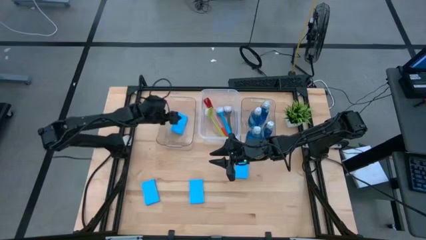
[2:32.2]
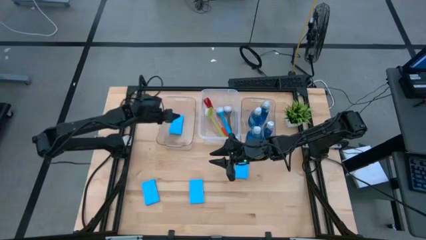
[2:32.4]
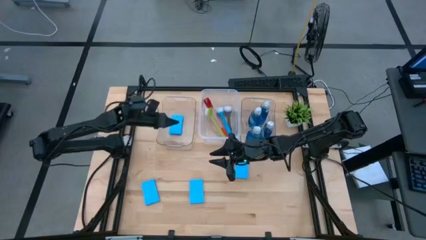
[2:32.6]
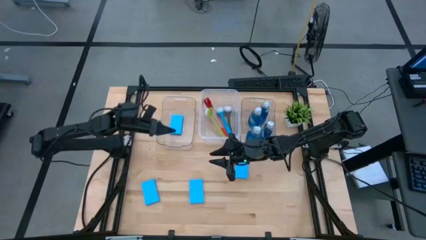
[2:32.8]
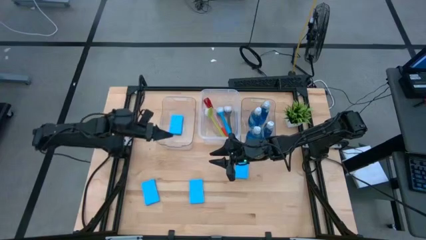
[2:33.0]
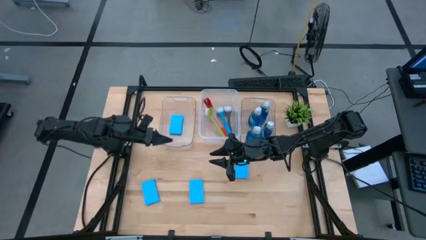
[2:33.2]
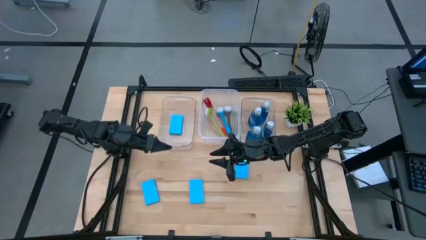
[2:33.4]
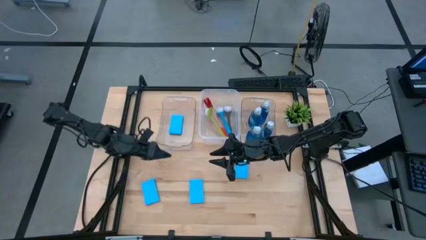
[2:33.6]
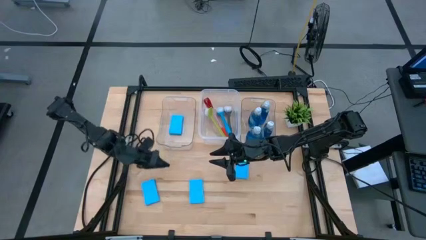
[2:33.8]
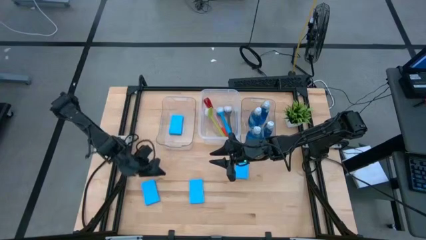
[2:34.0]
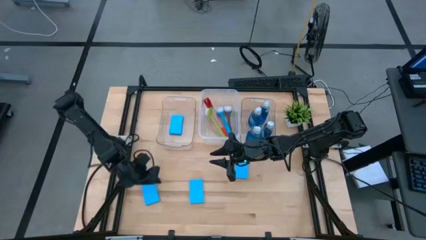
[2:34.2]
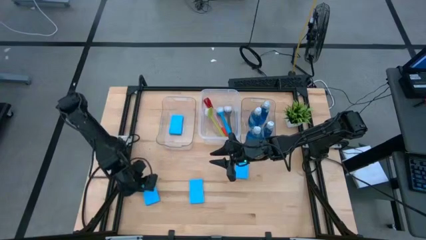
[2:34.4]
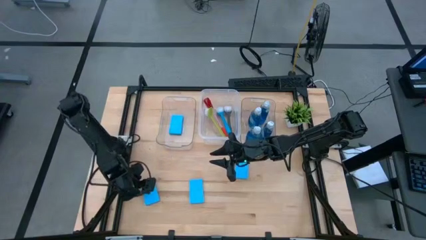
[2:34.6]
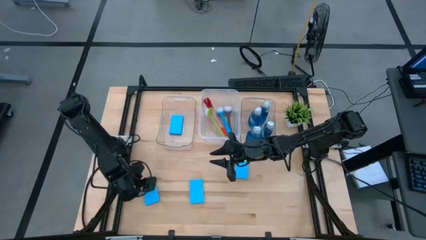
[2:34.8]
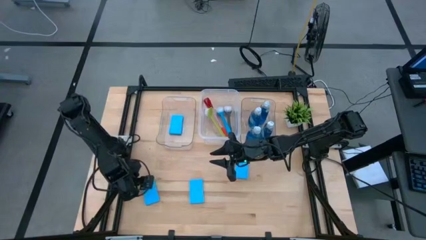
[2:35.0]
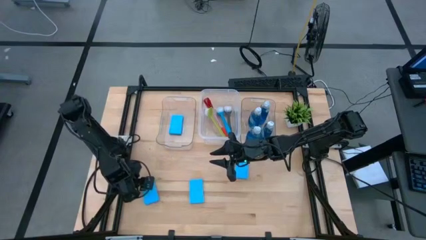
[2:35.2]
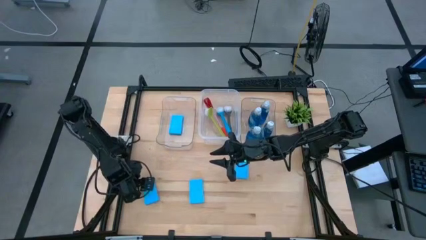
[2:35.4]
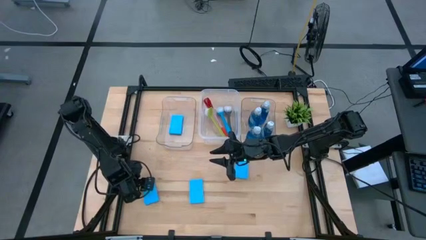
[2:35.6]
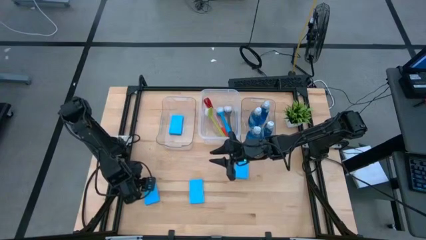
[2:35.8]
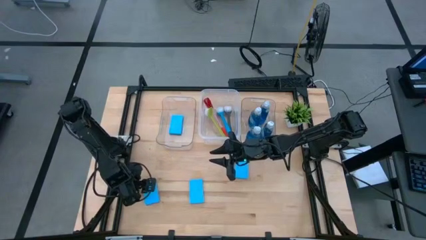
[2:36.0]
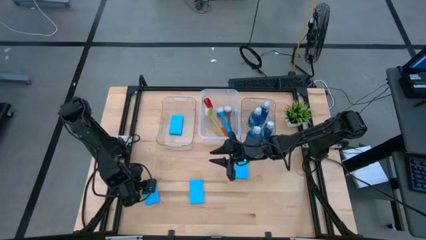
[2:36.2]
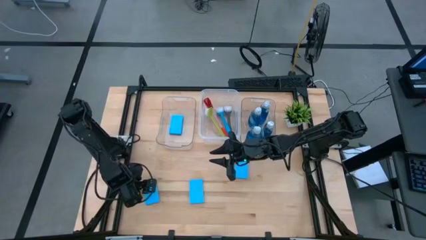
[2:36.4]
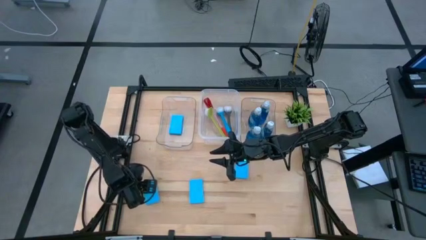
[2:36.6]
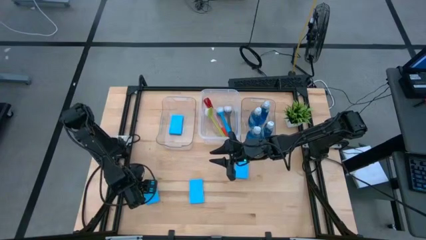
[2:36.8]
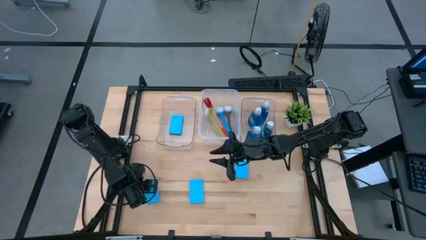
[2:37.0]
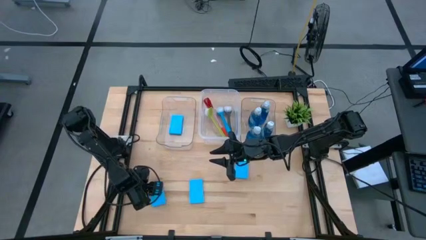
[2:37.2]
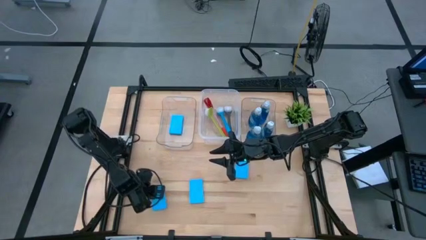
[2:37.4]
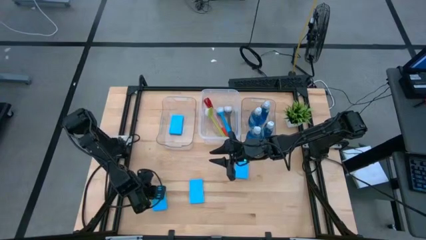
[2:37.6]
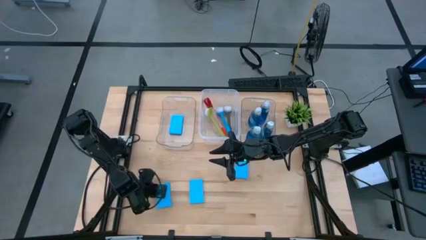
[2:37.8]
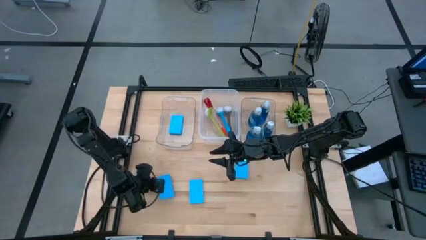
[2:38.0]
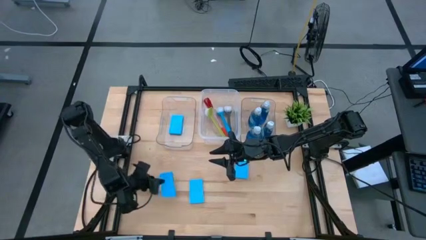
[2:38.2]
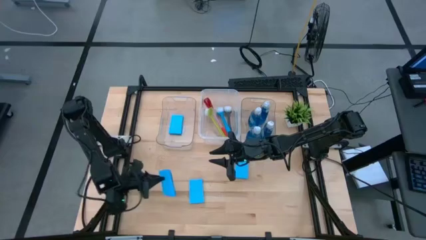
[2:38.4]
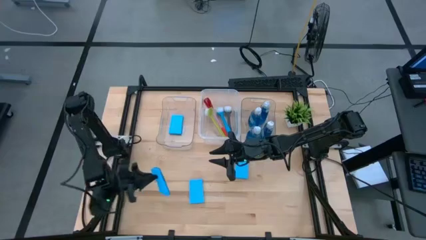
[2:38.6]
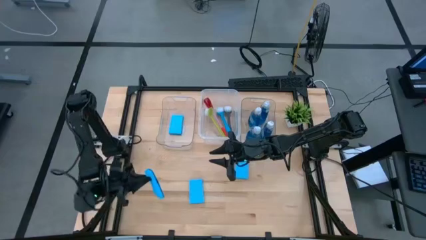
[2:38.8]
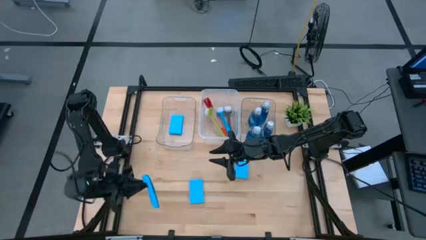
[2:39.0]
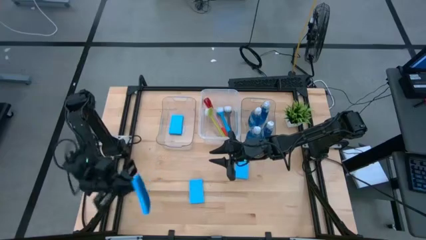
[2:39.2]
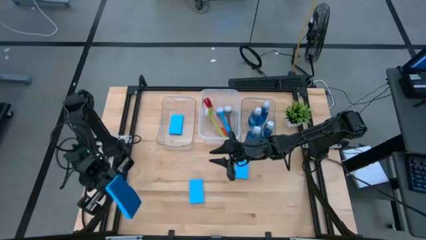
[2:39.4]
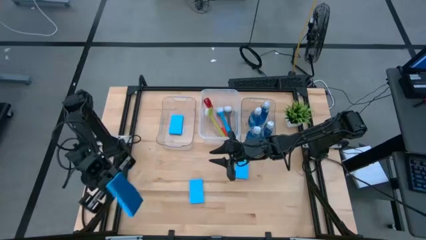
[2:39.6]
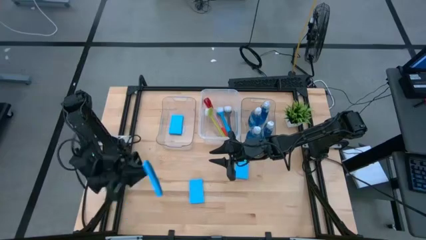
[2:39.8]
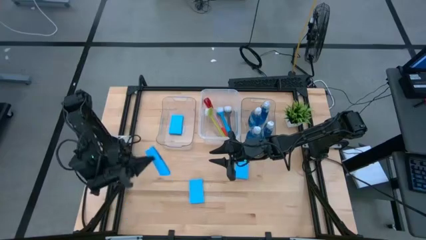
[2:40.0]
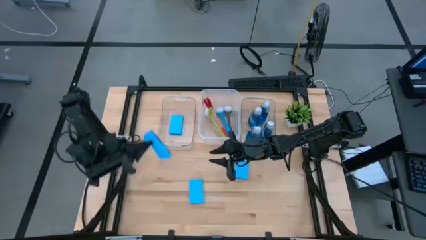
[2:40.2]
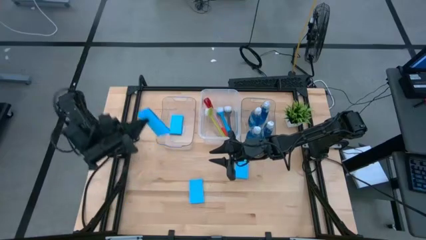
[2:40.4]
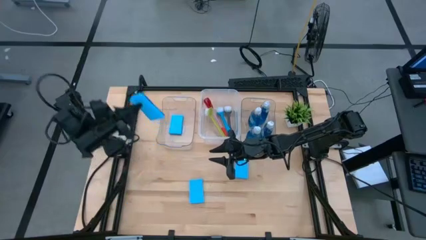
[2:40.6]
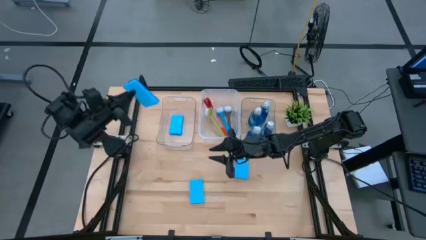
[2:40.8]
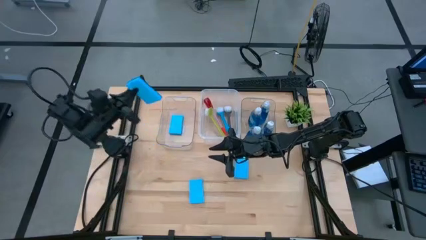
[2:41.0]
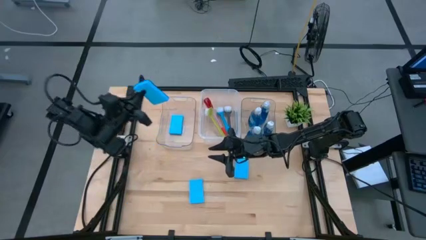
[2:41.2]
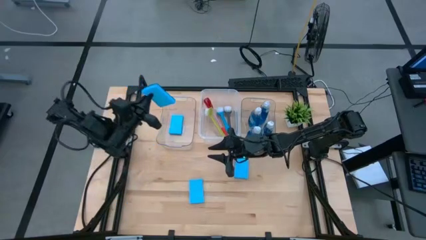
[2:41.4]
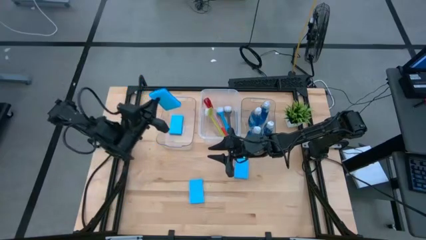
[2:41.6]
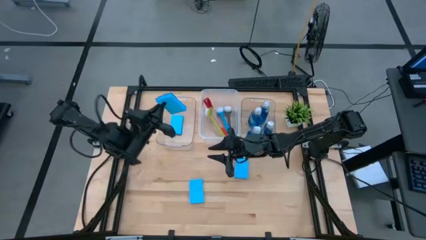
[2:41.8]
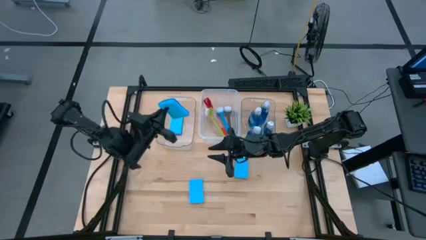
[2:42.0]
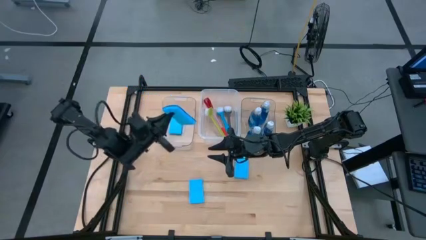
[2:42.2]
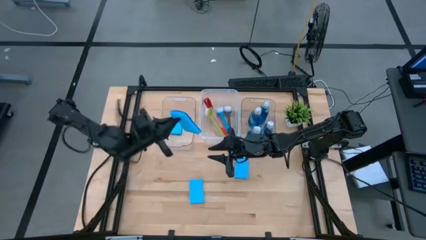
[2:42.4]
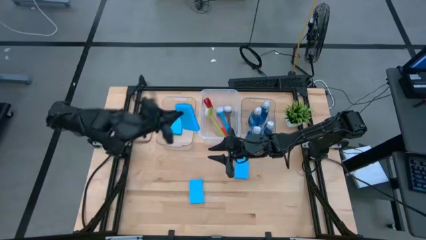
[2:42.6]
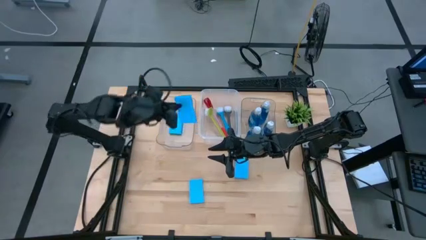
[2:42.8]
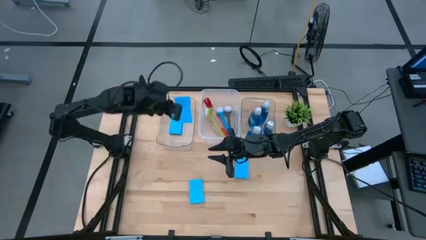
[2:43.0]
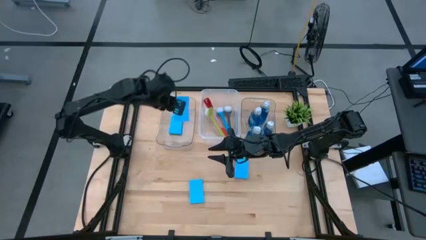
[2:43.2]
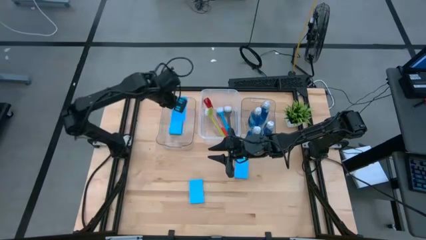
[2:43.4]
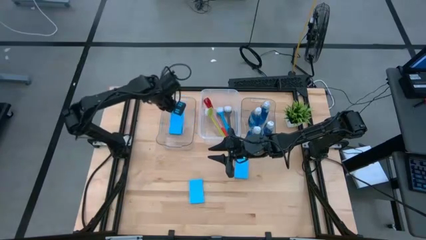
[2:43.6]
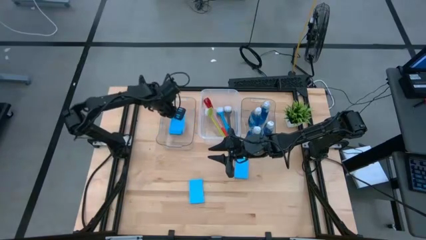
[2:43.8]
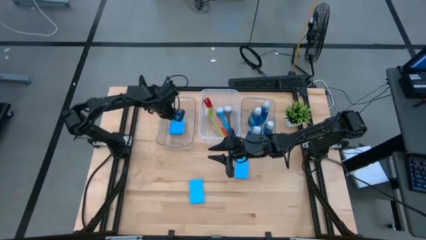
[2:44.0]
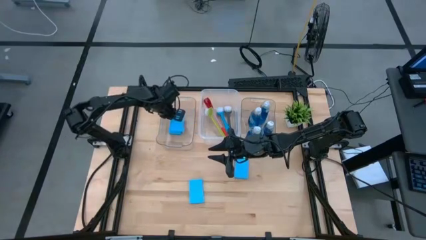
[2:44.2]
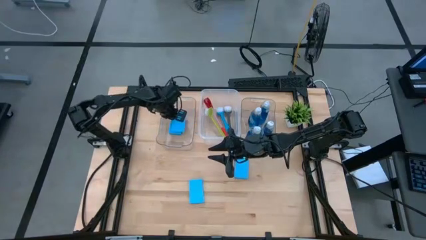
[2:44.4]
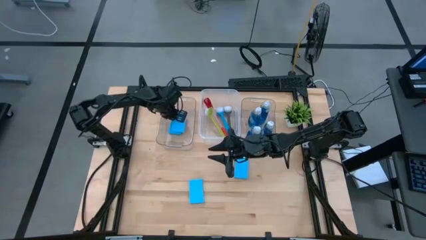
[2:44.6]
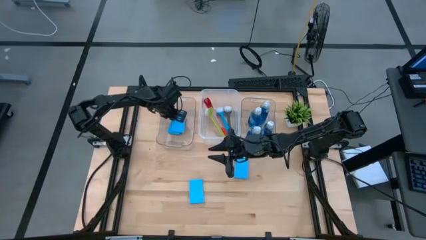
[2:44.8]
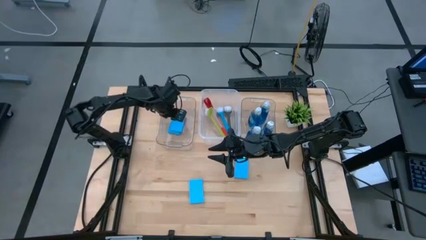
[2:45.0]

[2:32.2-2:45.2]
Task: Pick & Place Kitchen Sink Supplies
Put the blue sponge into the left transparent bin
